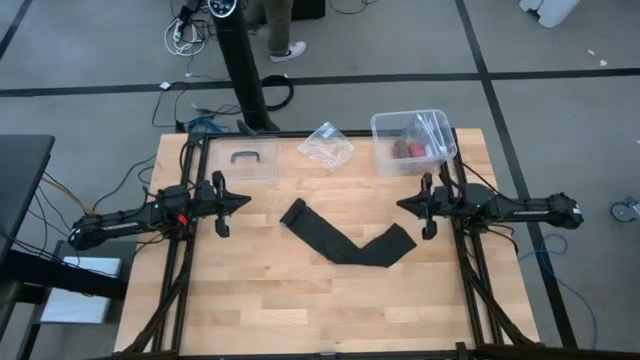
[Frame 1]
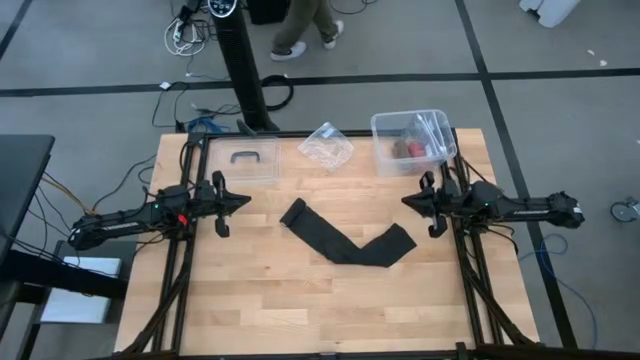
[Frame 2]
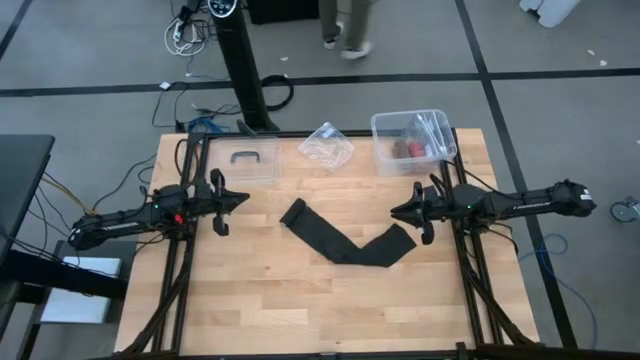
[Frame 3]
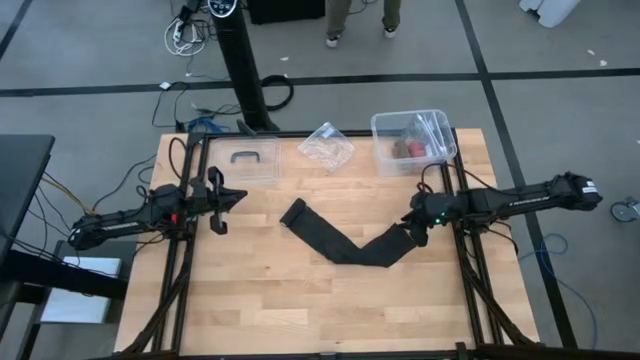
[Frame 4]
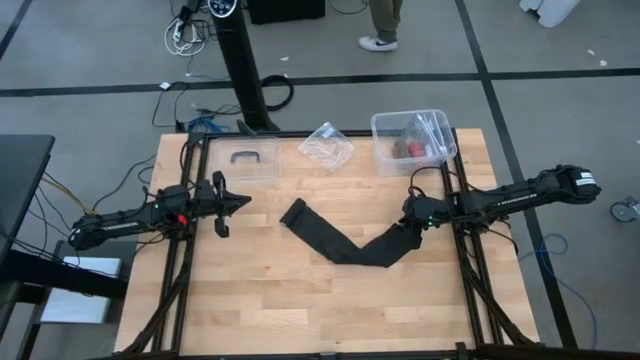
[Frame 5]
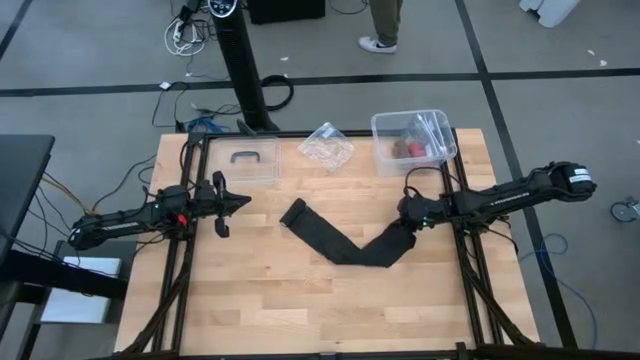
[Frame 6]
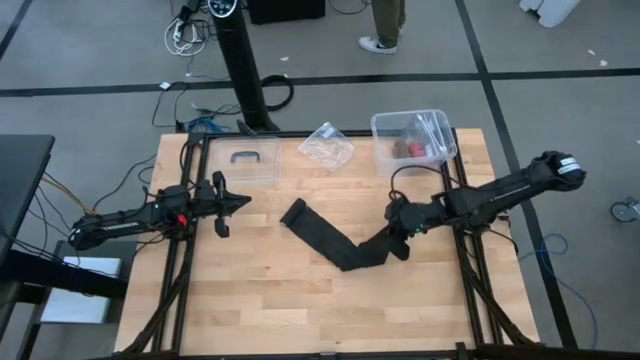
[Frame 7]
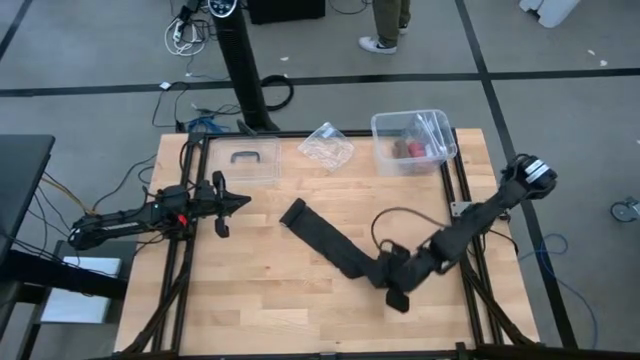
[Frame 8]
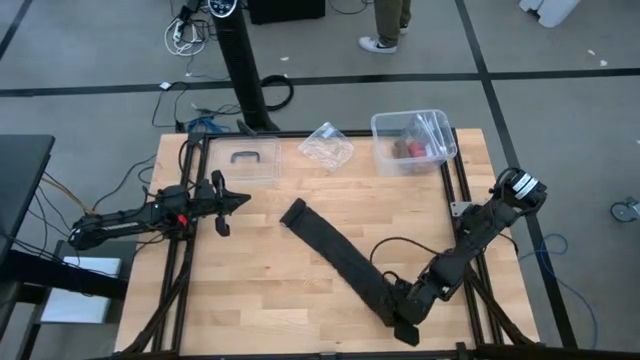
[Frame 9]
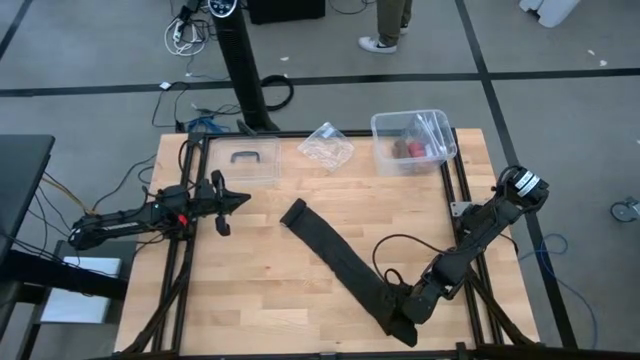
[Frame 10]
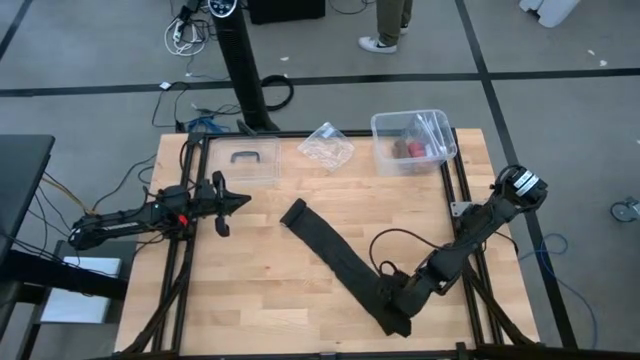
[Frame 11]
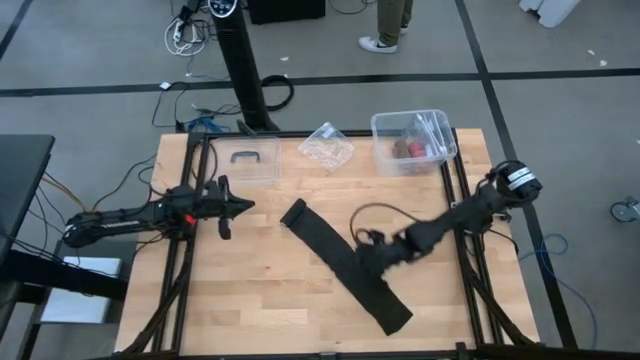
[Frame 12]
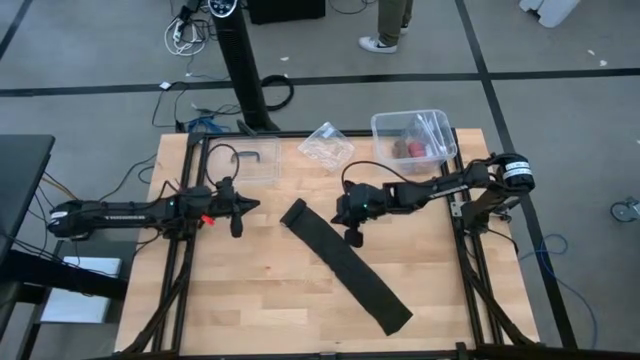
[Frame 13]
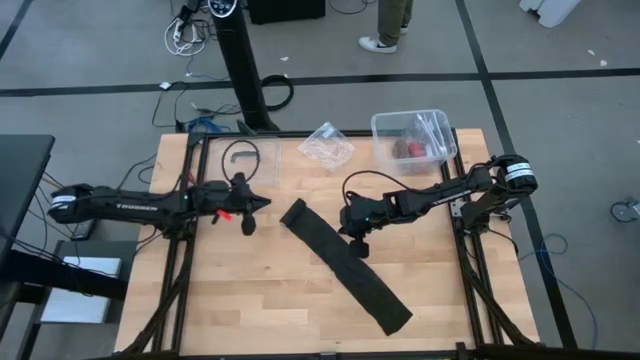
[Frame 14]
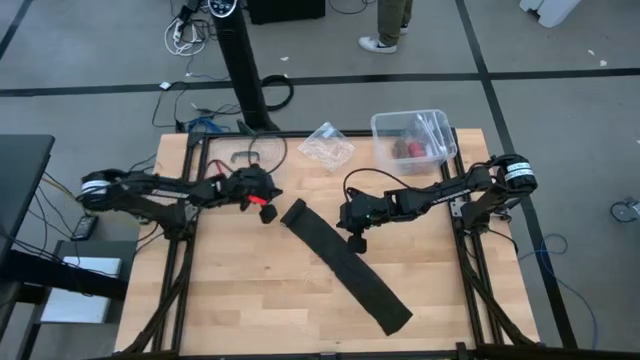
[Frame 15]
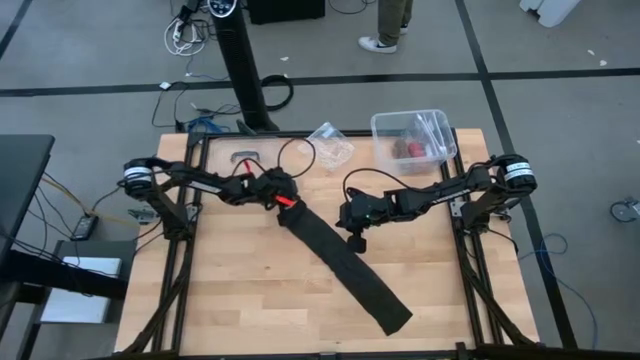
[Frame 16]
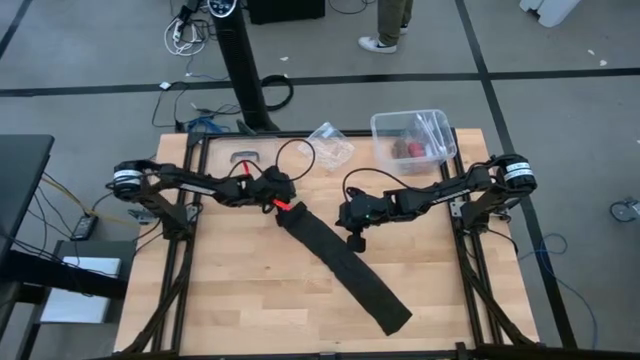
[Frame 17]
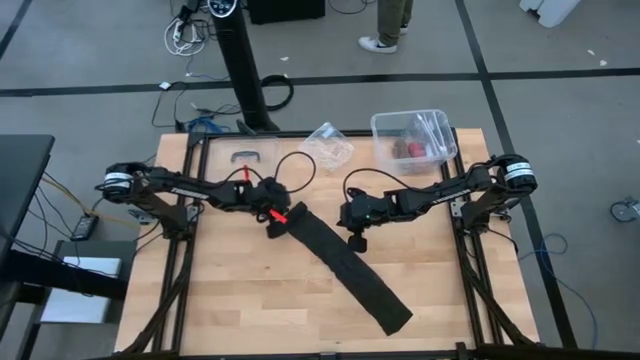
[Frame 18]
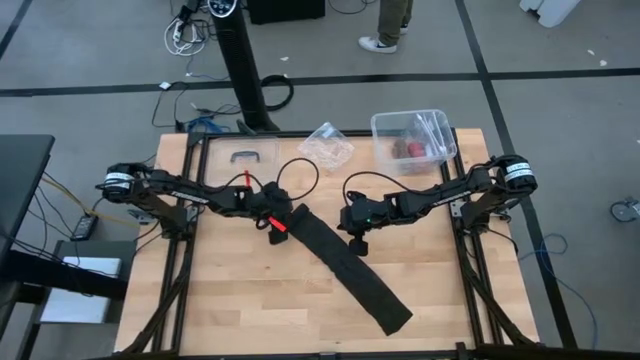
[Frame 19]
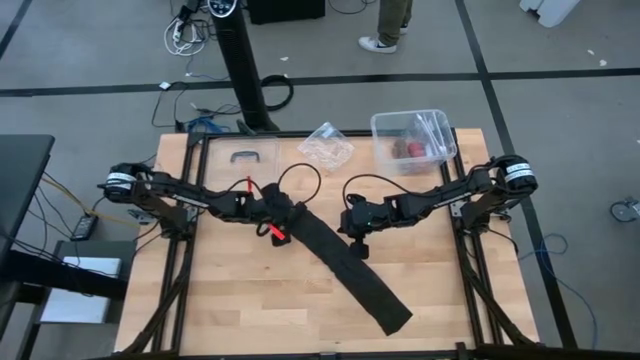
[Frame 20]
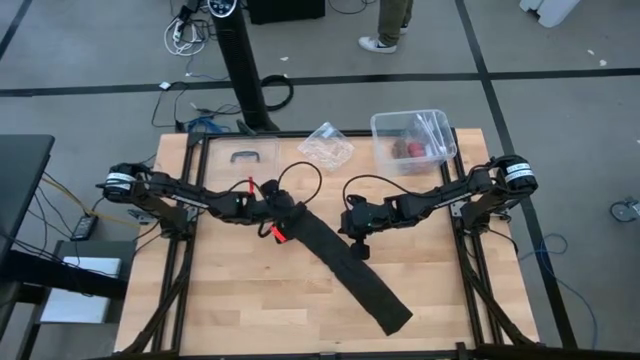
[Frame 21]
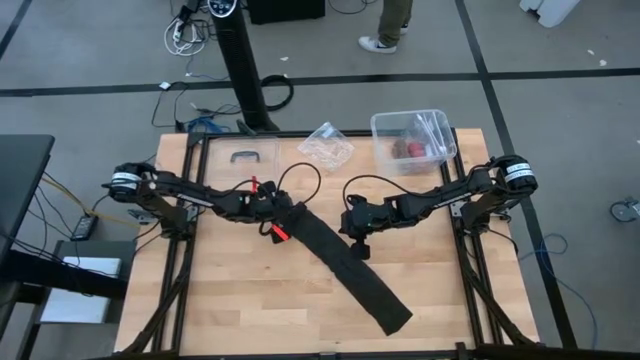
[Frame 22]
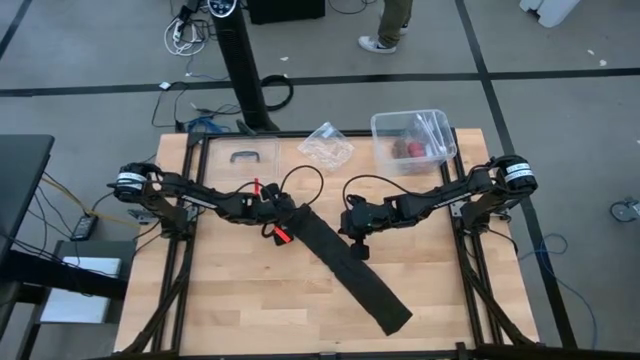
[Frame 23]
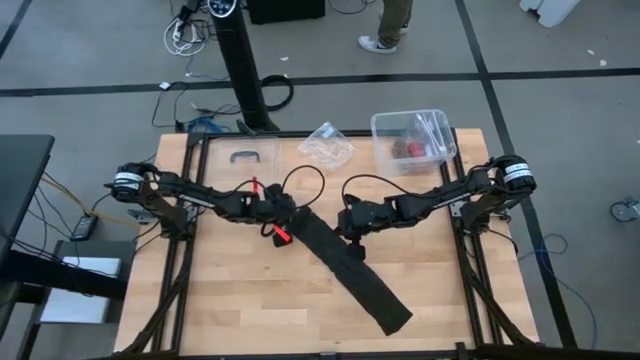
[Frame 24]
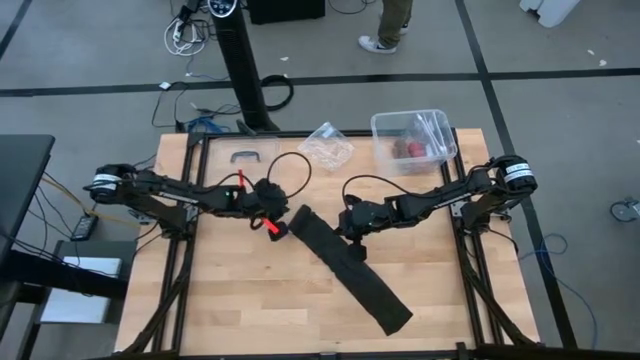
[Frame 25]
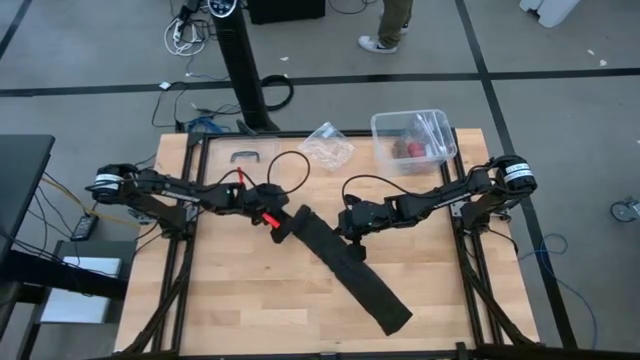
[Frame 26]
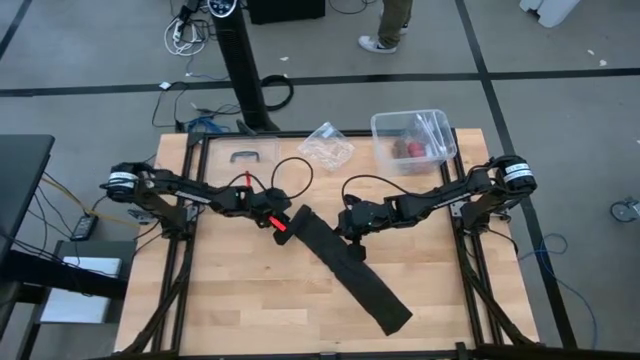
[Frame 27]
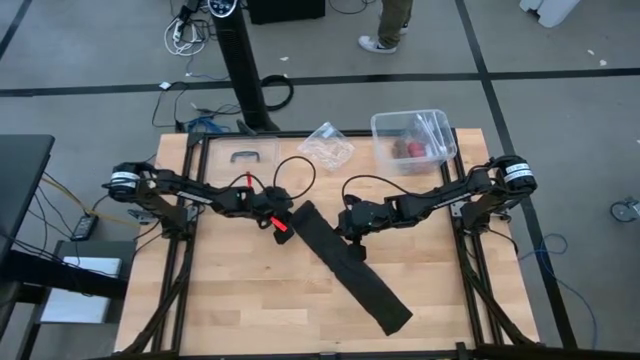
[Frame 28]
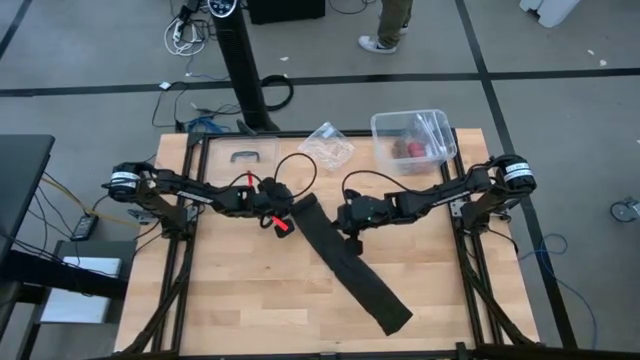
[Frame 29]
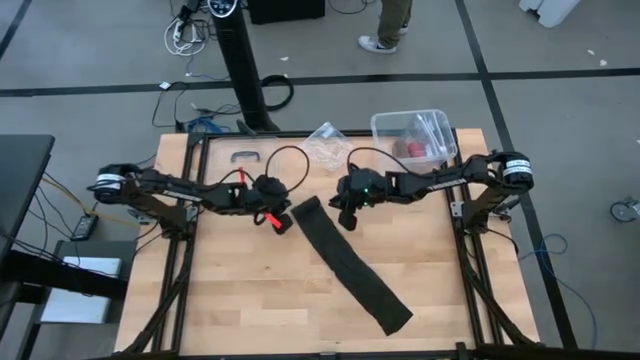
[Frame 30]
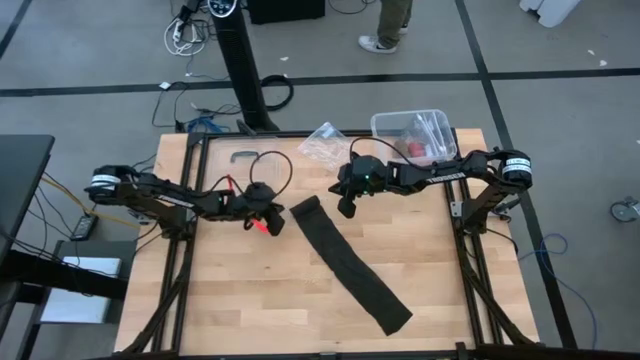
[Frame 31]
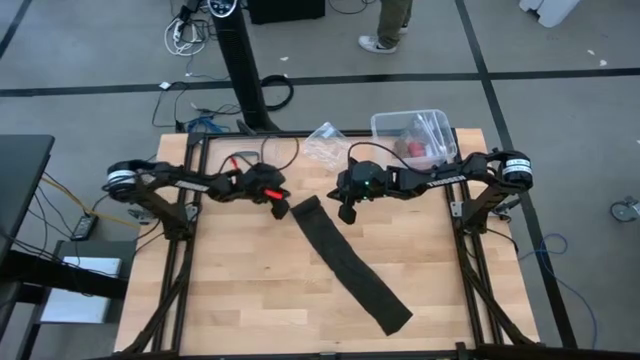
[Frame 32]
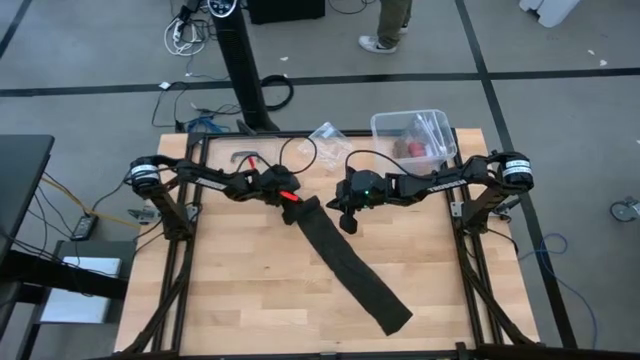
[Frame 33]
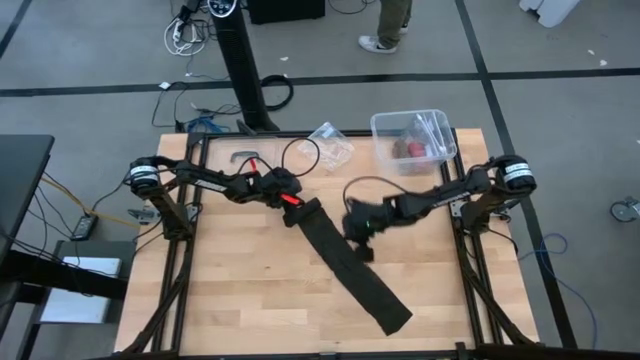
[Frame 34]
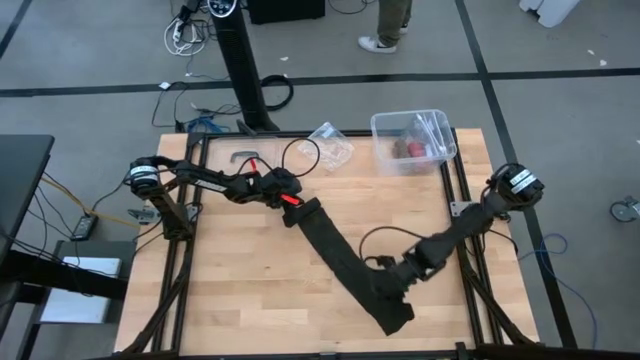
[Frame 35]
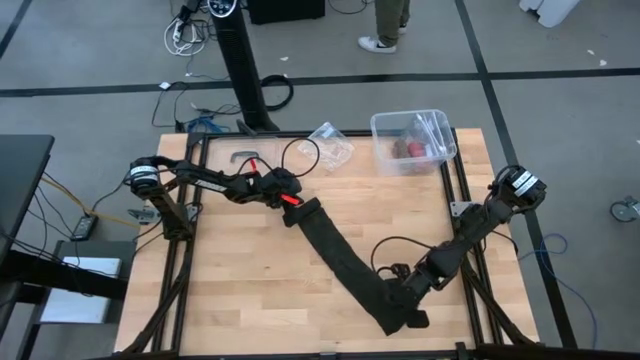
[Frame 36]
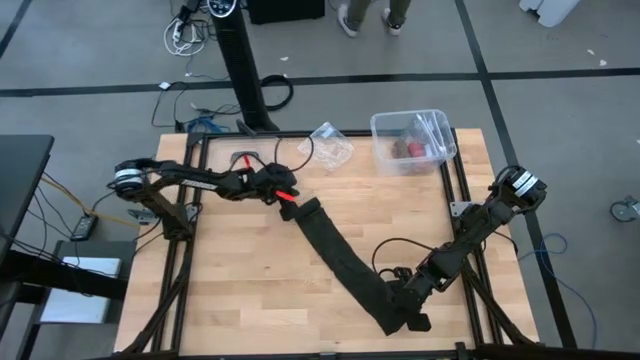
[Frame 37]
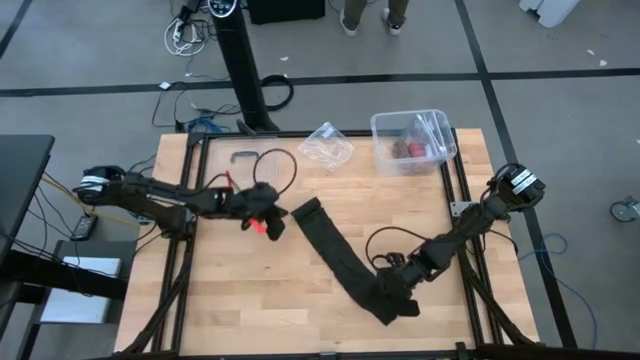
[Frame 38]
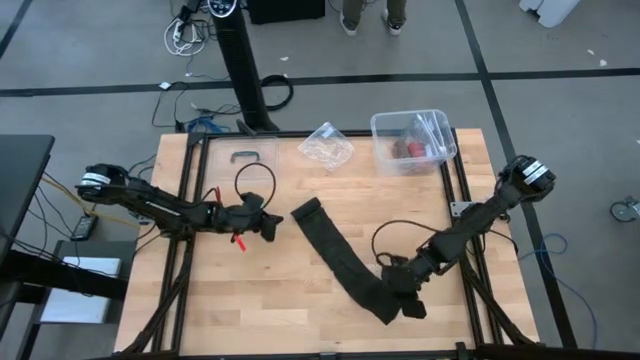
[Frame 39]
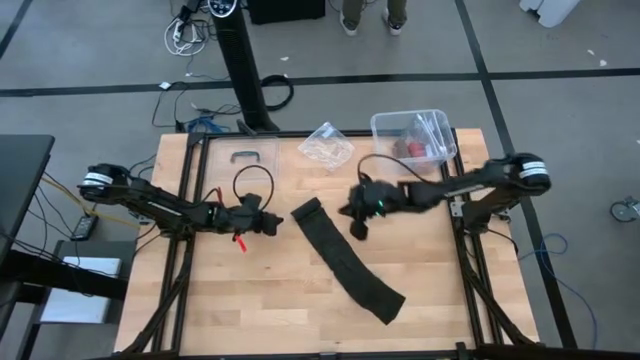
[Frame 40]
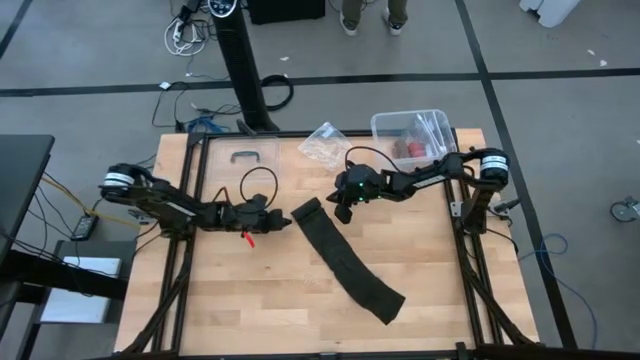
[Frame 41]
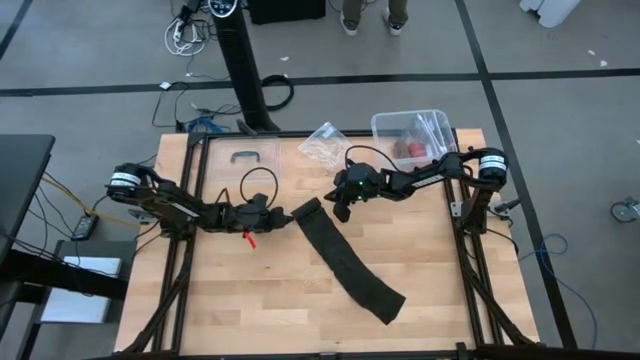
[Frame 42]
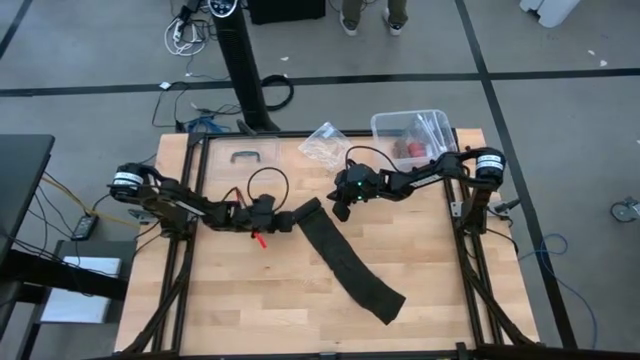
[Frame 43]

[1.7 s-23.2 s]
Task: Roll bandage
Roll the black bandage
